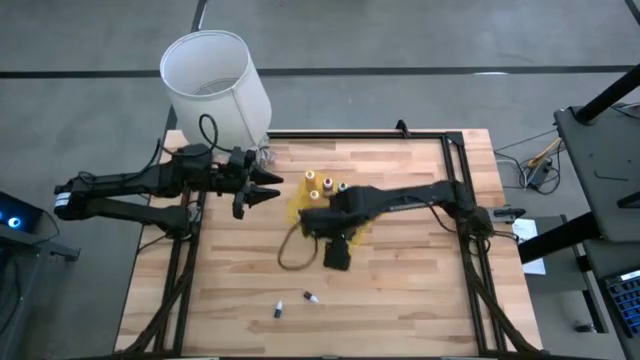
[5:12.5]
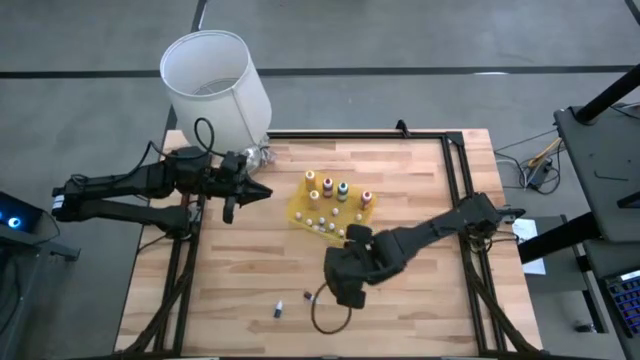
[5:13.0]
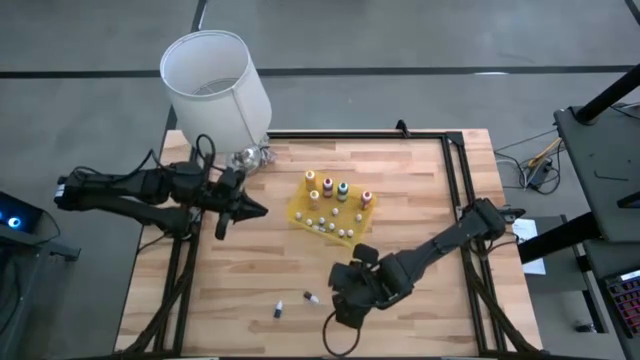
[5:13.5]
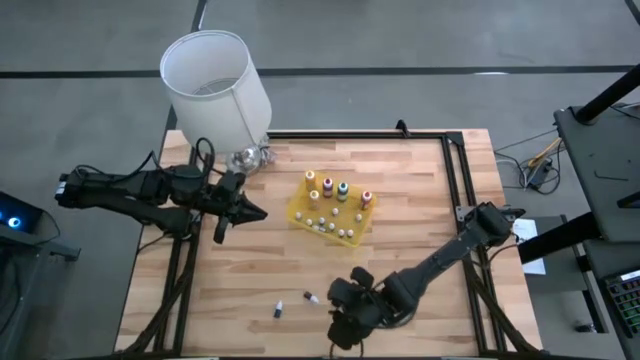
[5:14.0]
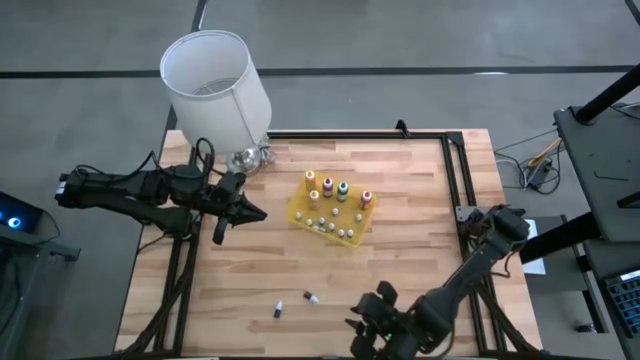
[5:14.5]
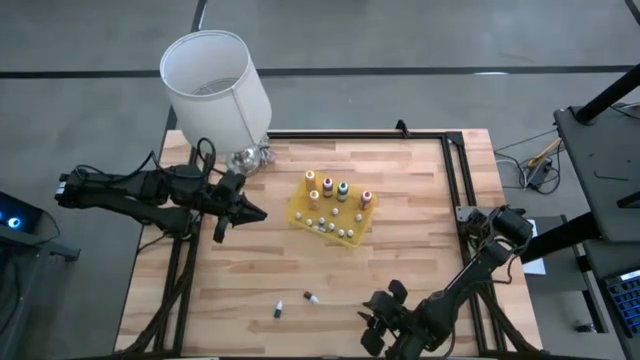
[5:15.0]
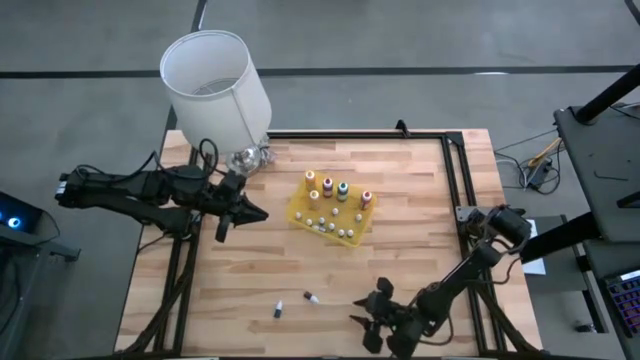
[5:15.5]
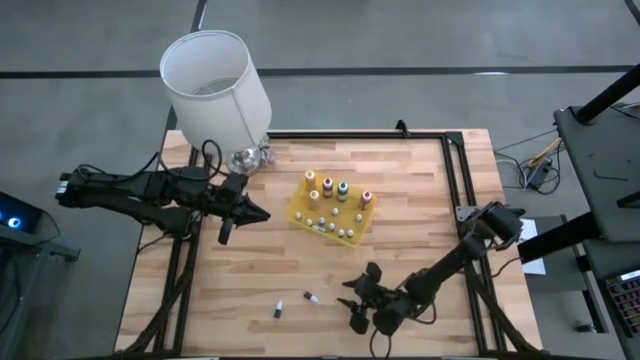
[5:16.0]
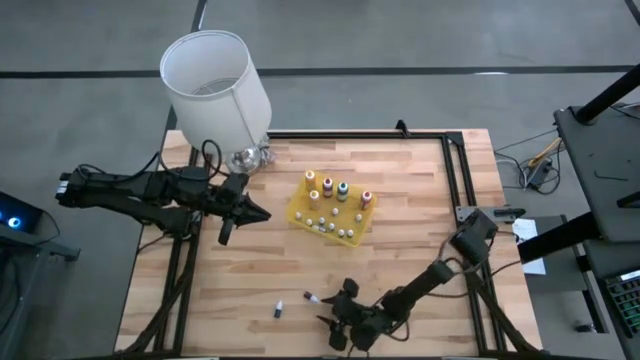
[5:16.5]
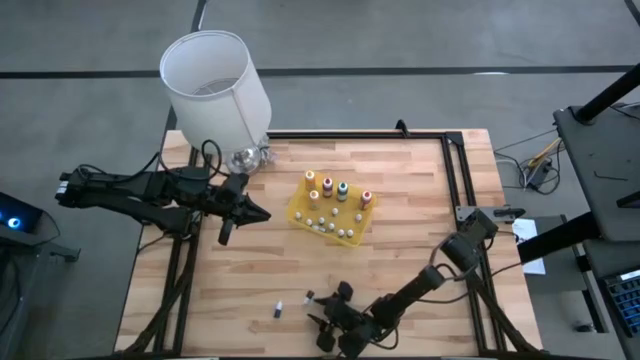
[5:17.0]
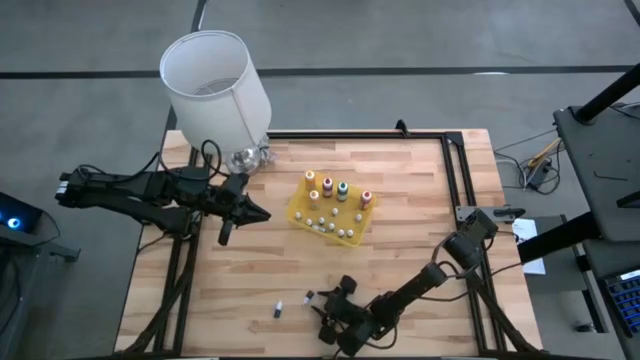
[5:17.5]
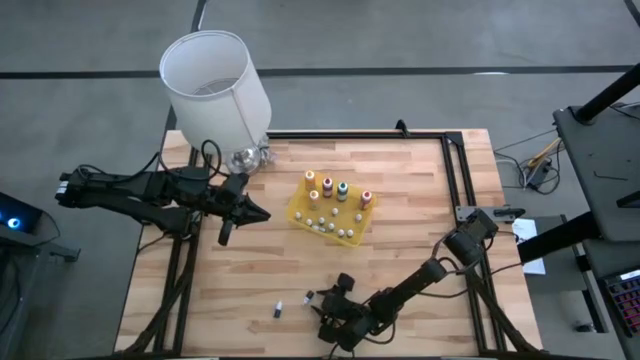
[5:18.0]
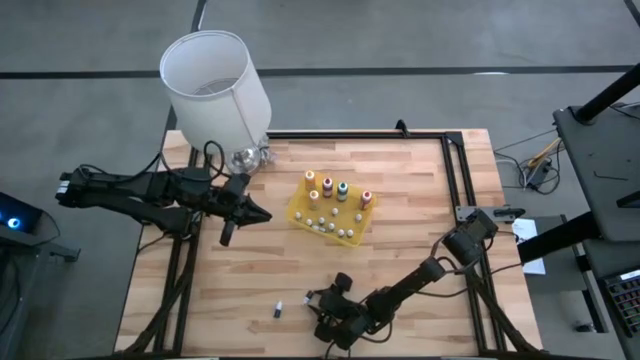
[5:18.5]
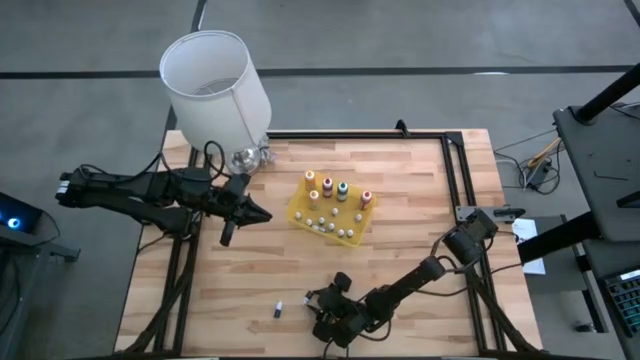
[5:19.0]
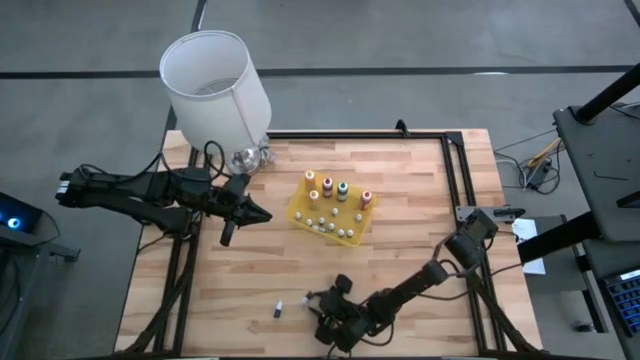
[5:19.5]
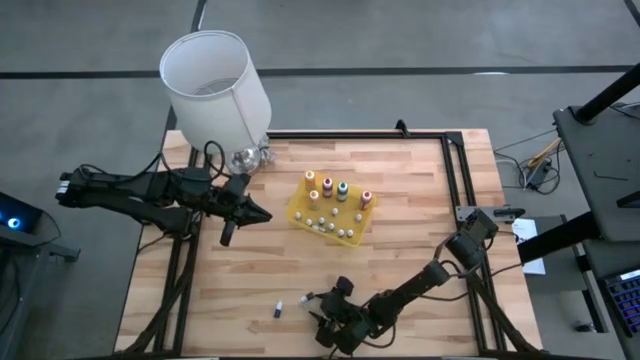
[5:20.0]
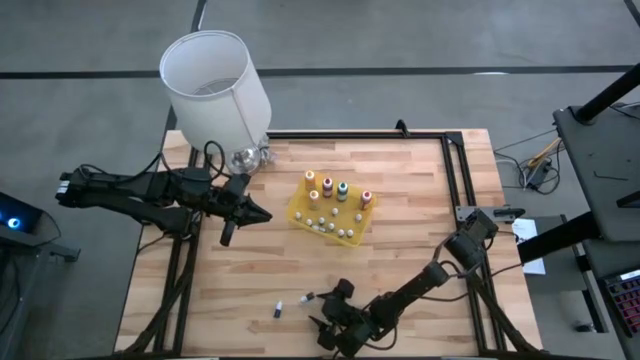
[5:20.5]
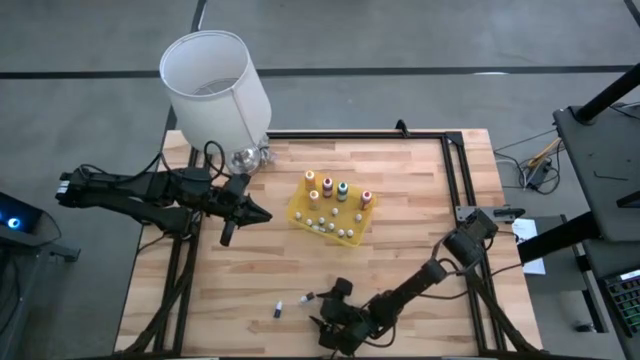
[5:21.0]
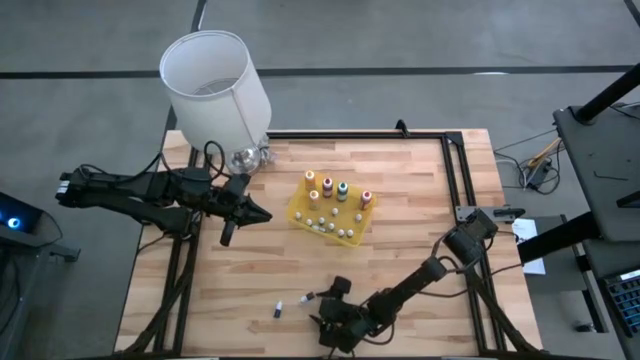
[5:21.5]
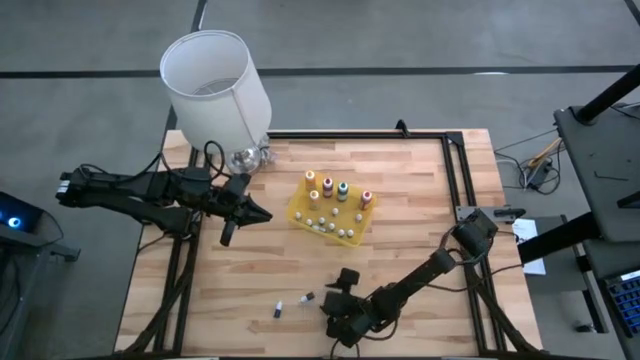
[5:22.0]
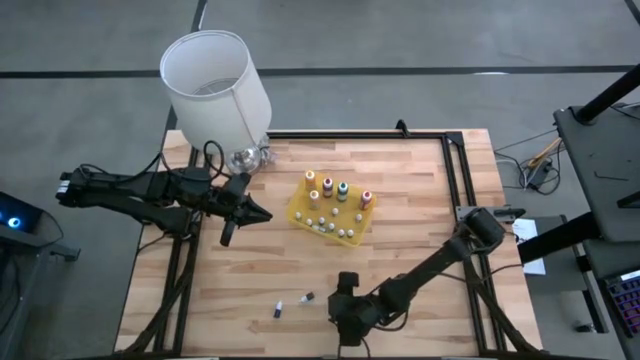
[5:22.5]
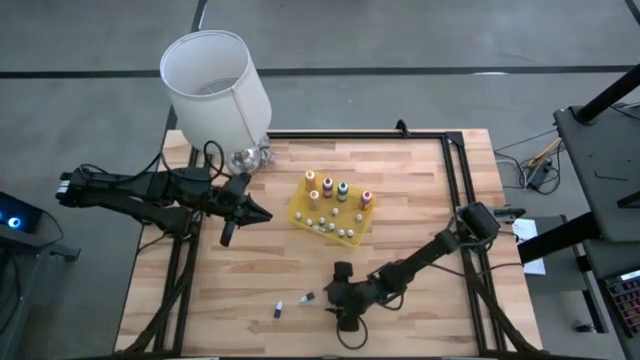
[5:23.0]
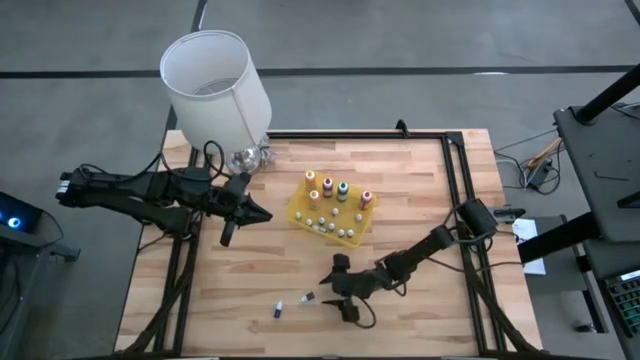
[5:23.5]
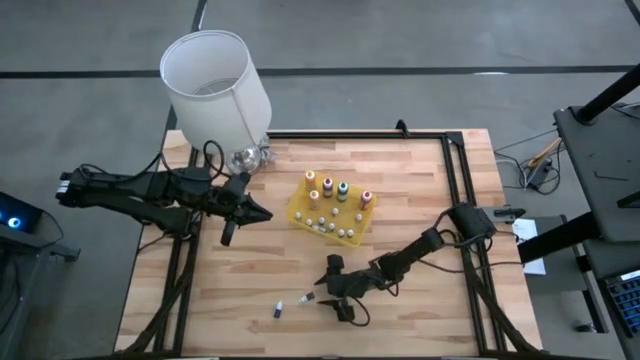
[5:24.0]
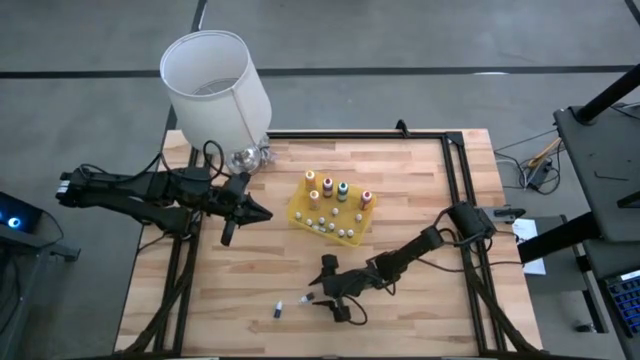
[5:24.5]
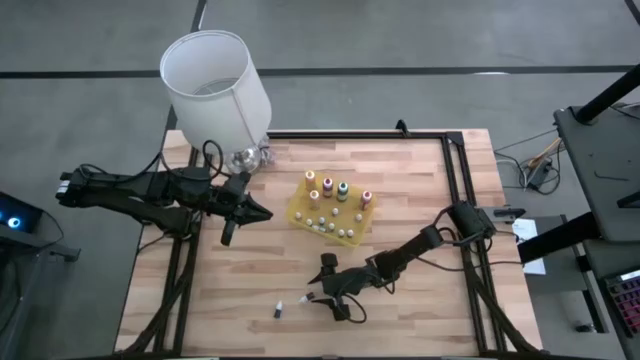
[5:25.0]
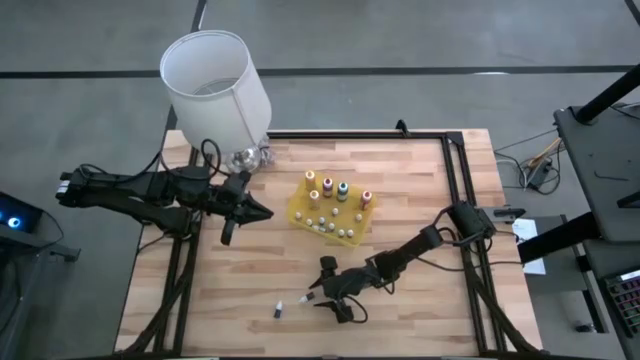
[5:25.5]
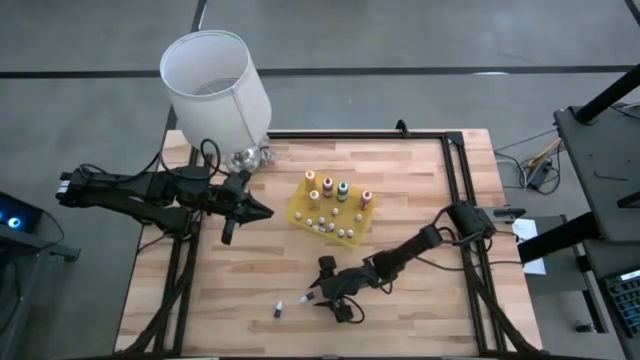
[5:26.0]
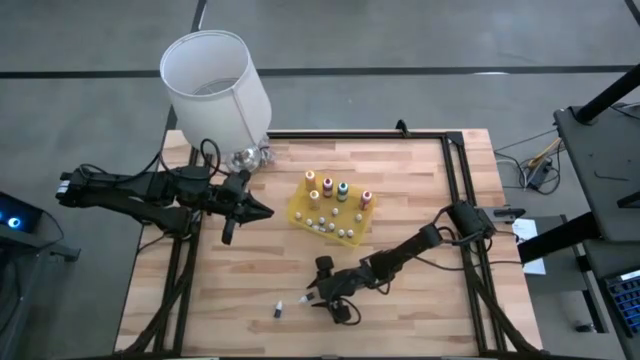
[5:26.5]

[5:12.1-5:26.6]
Task: Pick & Place food coloring
Put the small orange food coloring bottle into the yellow bin

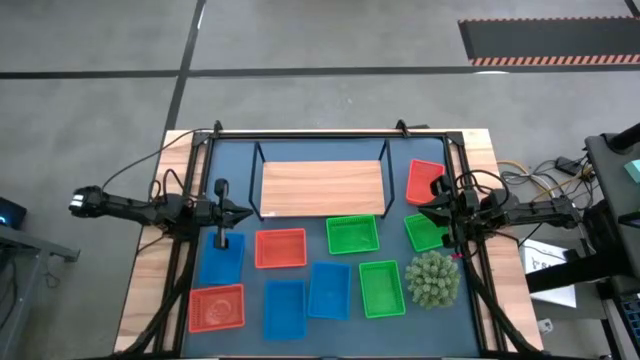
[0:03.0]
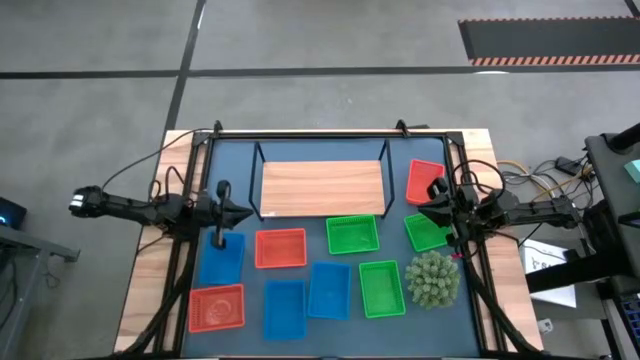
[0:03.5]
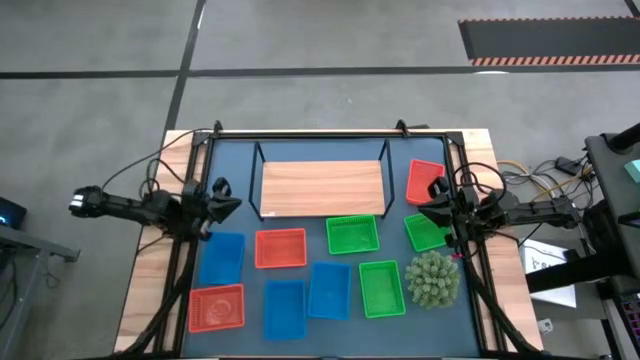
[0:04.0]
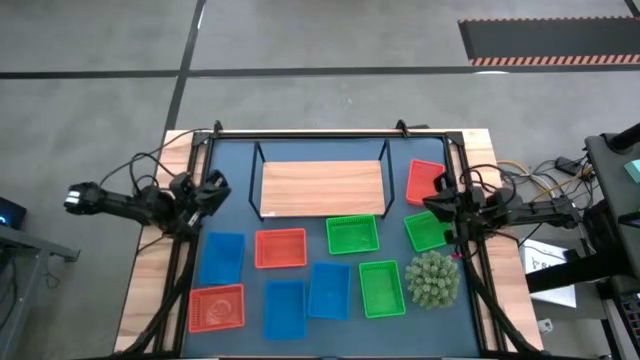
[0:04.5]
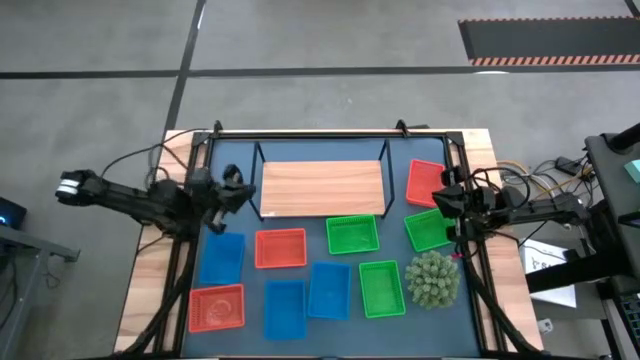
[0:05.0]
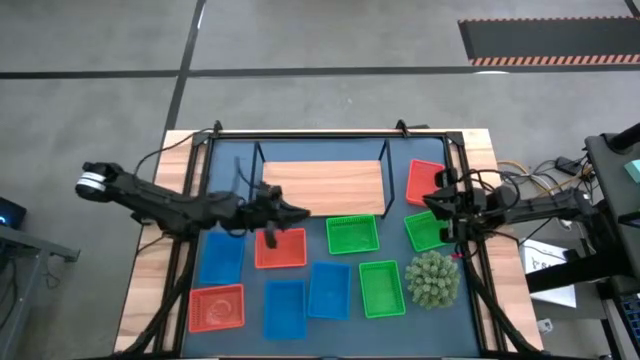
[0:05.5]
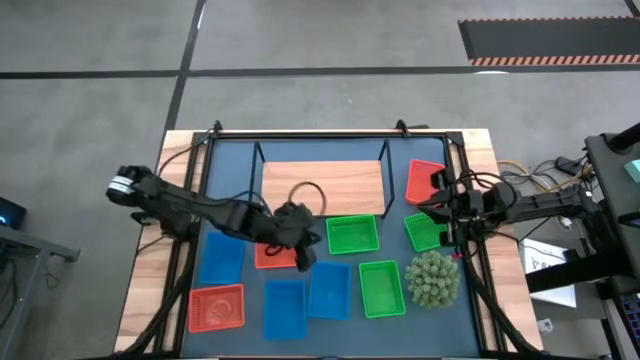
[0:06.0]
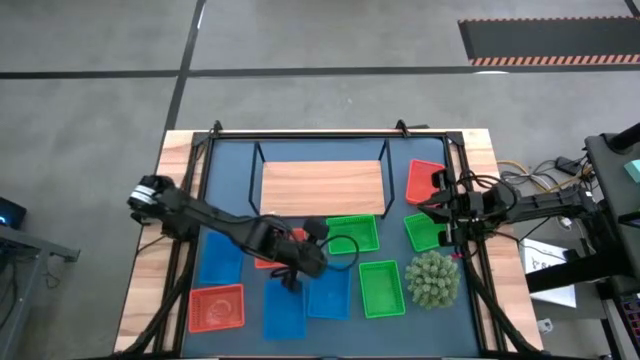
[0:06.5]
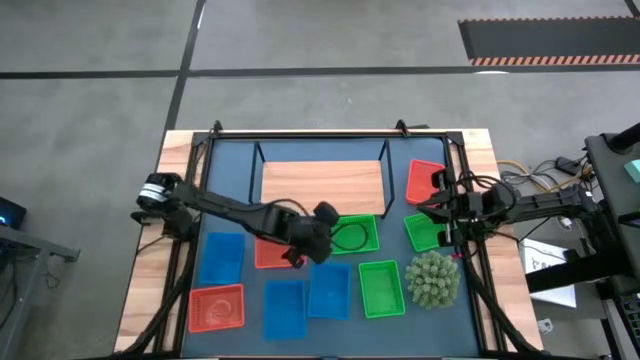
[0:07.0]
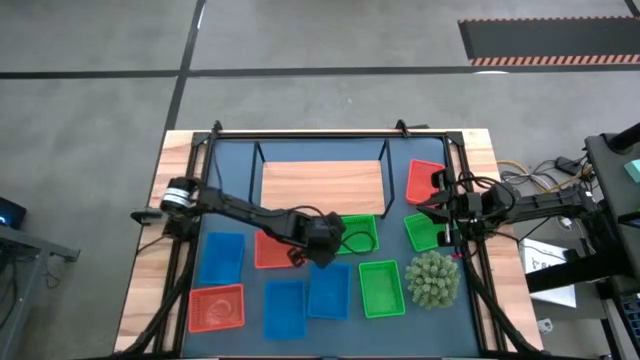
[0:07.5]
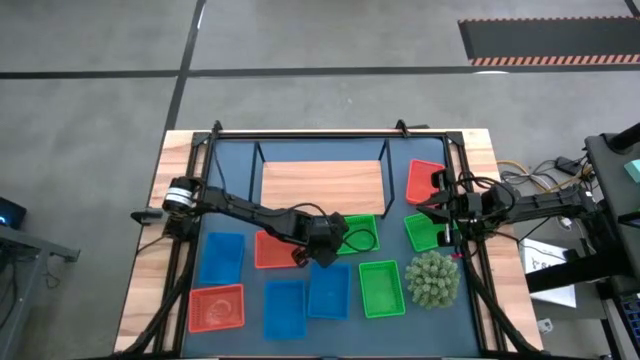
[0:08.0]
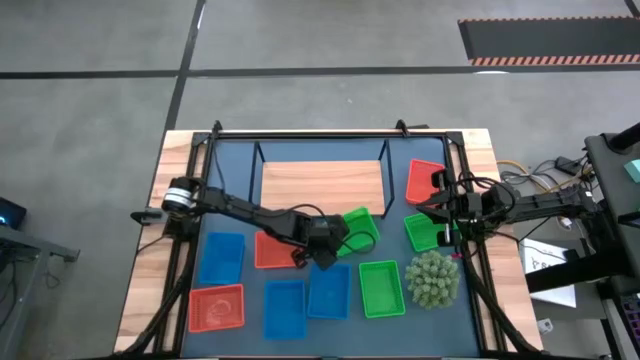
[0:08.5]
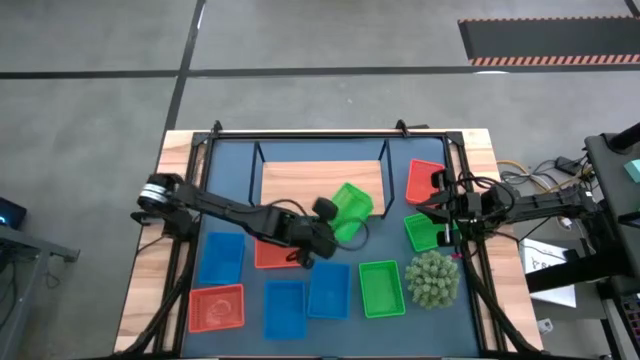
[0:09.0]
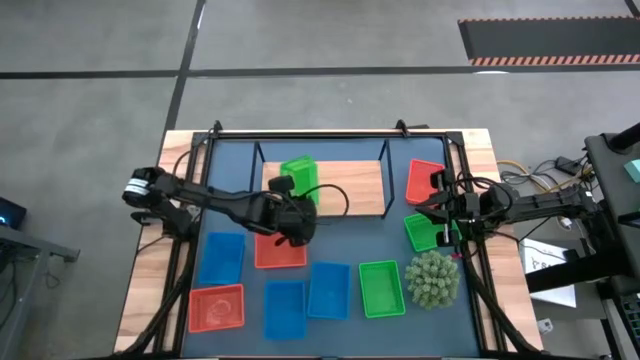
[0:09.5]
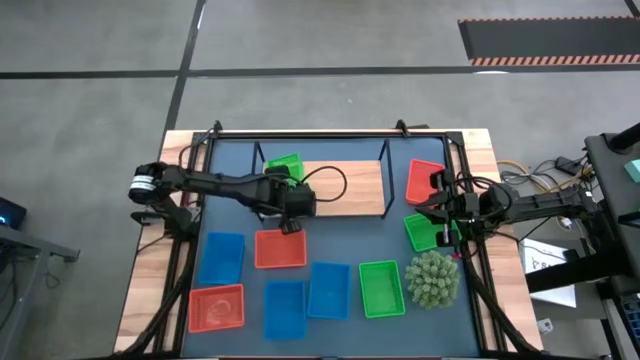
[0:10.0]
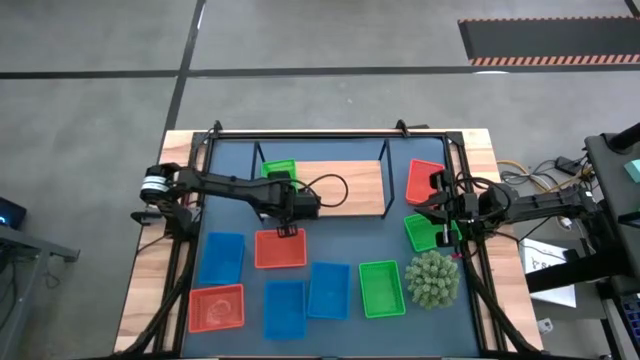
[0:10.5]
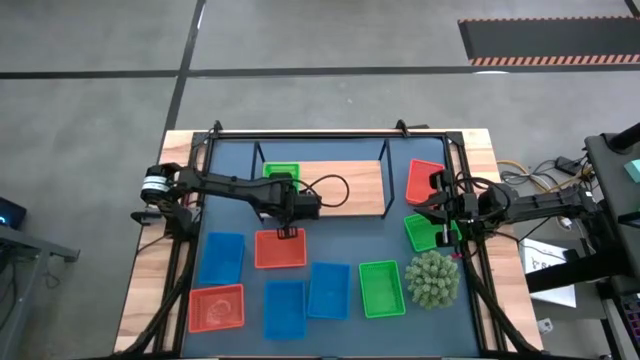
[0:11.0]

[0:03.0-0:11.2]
Task: Stack baskets on shelf by color
Put the top left green basket on the shelf
